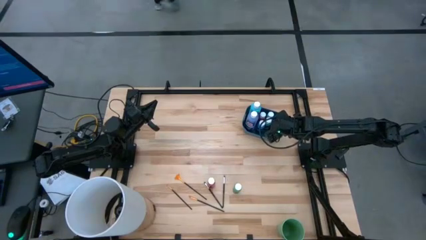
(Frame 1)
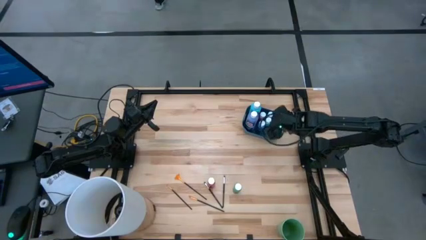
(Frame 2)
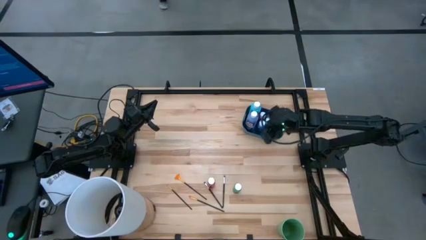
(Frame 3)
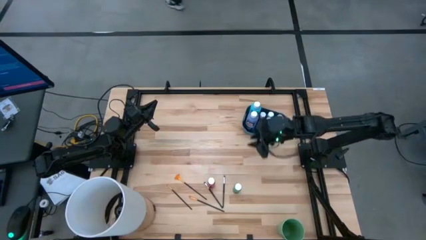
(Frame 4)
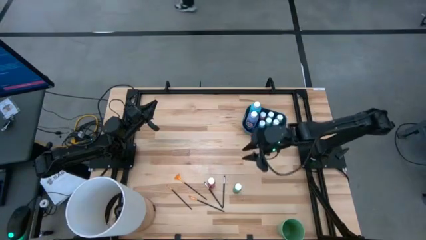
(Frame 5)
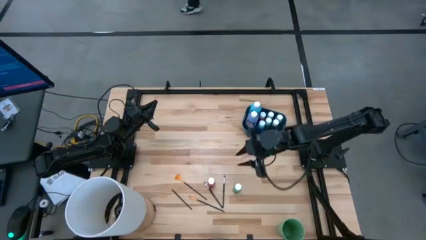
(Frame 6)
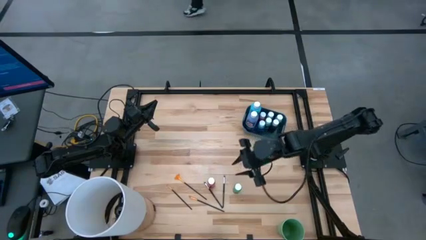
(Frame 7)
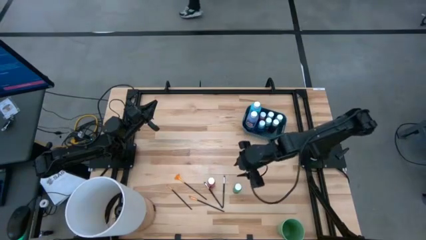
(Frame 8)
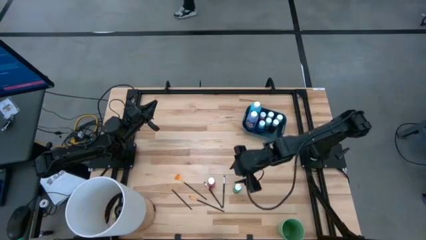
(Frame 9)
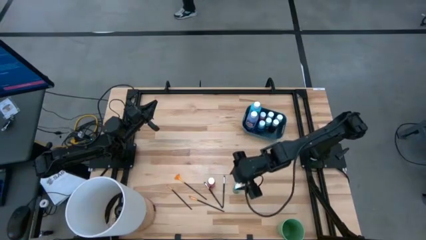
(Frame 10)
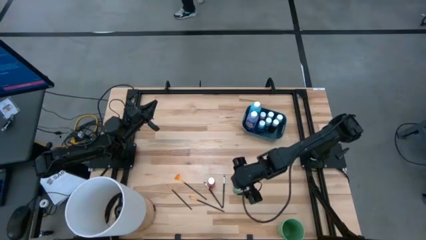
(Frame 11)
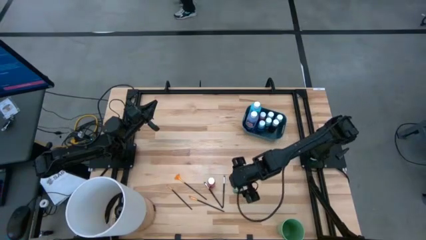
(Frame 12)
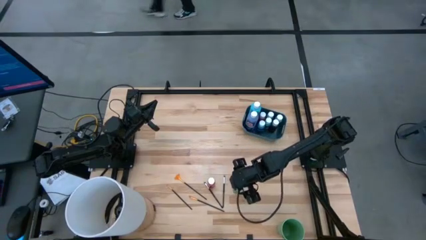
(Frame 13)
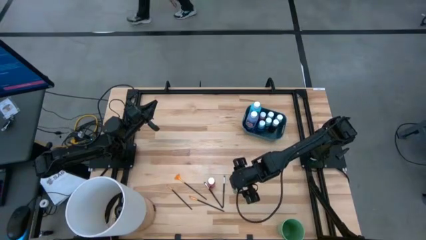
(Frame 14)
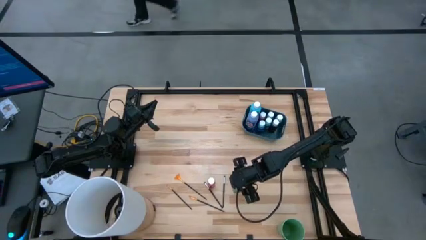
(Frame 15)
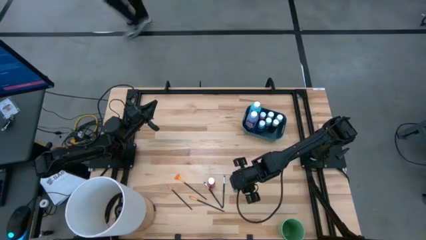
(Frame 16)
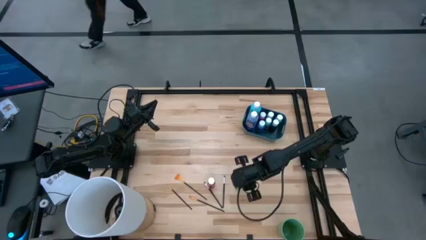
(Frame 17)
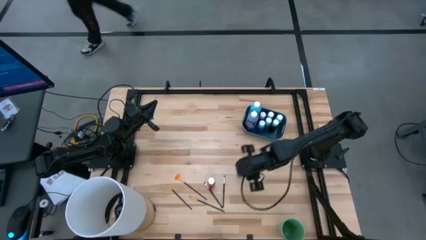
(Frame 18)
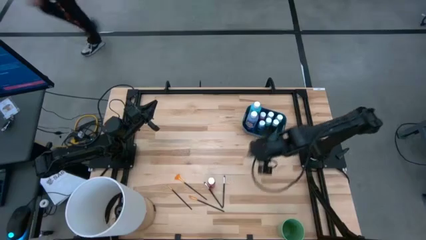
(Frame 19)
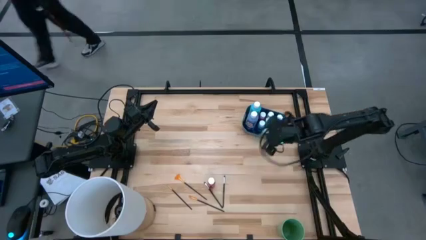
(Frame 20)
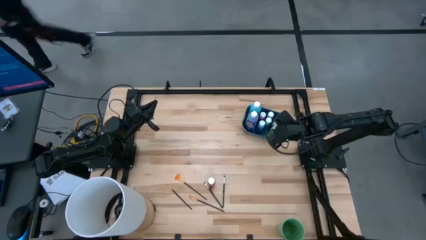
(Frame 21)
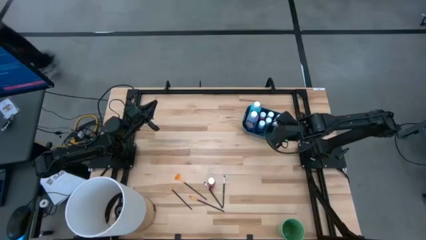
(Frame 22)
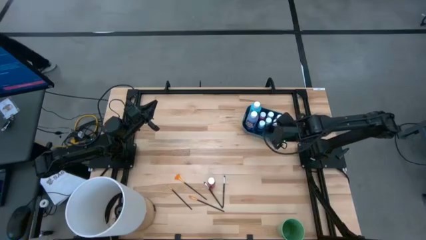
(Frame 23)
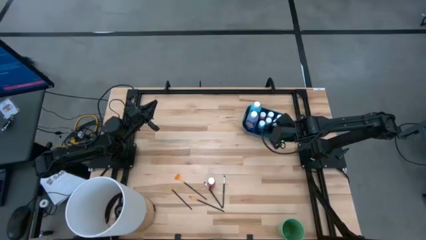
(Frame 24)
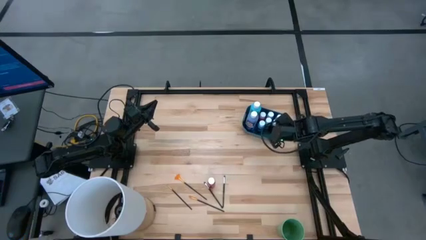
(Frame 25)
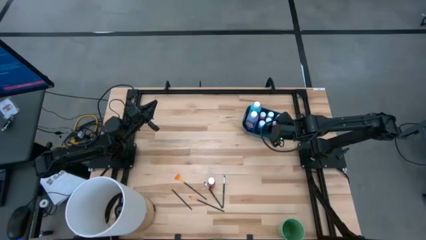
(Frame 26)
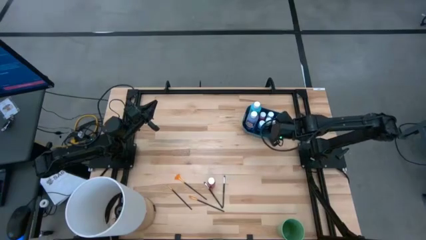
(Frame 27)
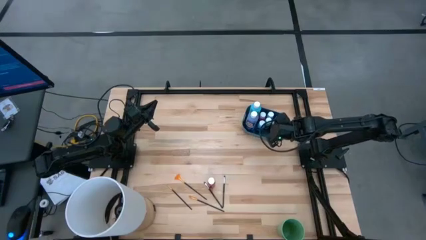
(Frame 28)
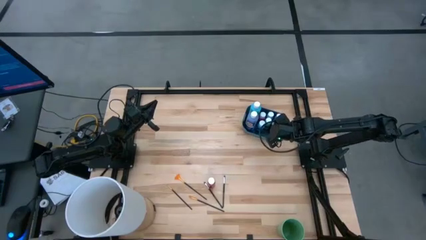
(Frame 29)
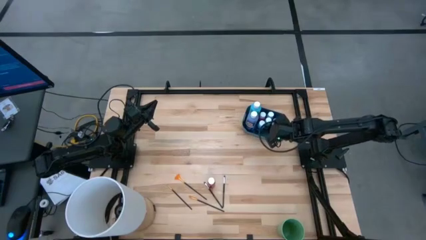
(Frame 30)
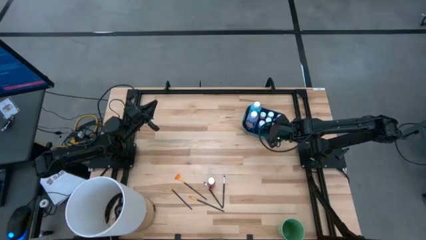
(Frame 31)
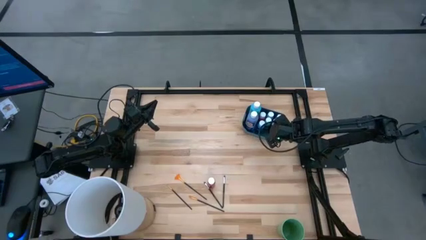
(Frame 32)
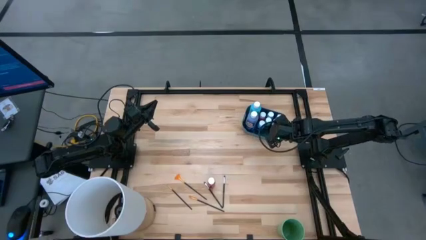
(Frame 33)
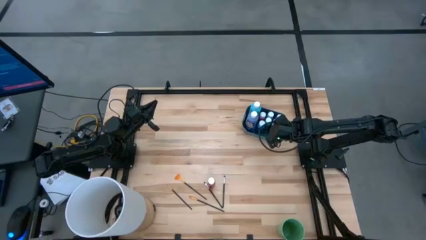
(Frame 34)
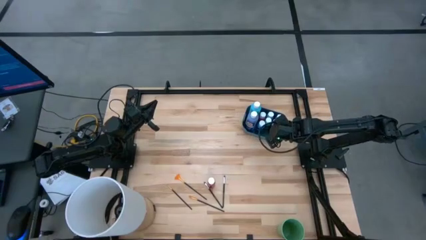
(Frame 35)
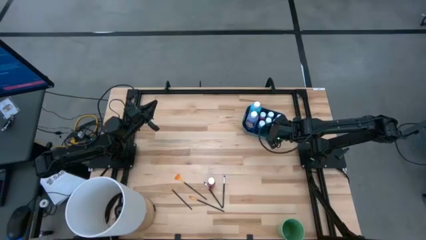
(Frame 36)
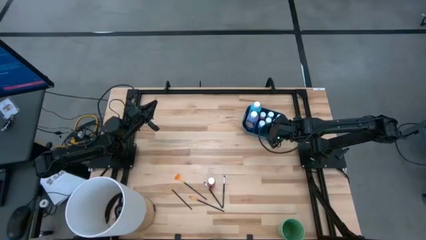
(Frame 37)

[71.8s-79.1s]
Task: Pick & Place Paint Supplies
Put the small green paint bottle into the blue bin

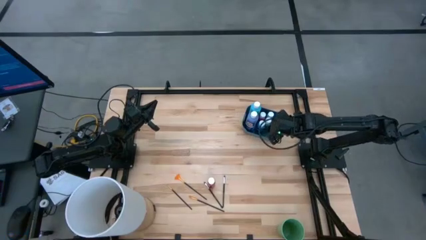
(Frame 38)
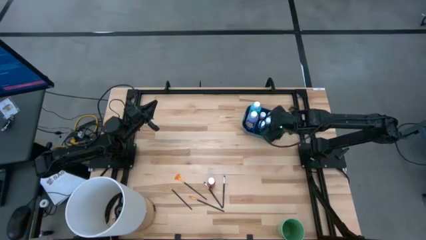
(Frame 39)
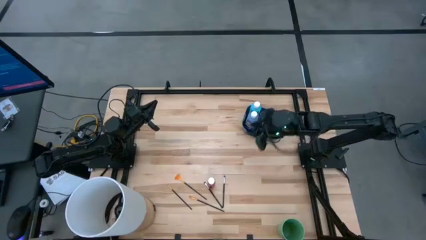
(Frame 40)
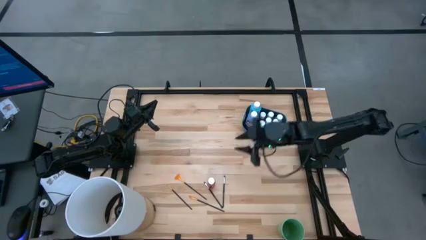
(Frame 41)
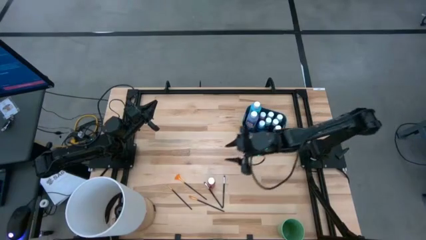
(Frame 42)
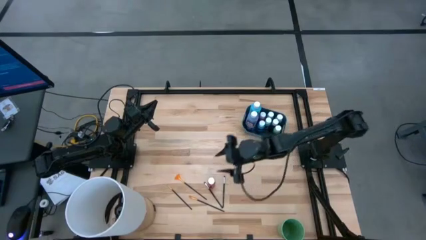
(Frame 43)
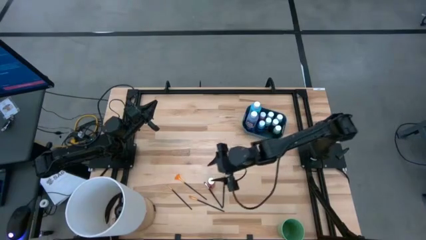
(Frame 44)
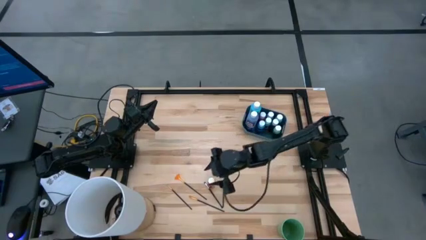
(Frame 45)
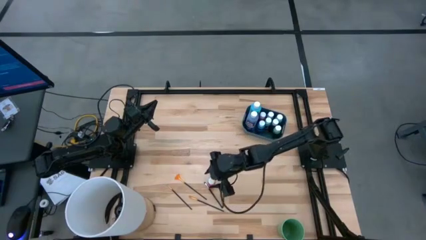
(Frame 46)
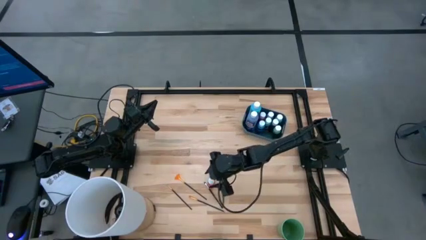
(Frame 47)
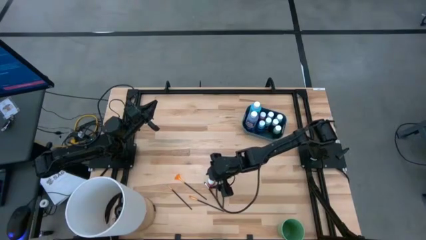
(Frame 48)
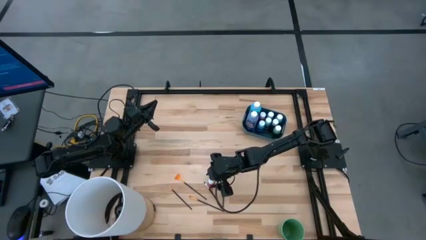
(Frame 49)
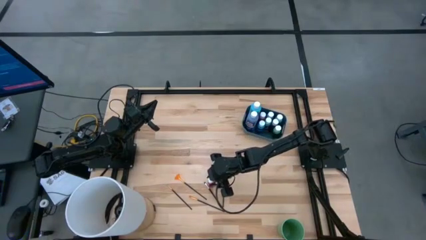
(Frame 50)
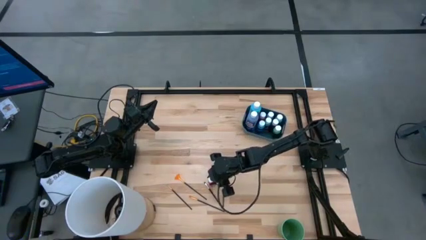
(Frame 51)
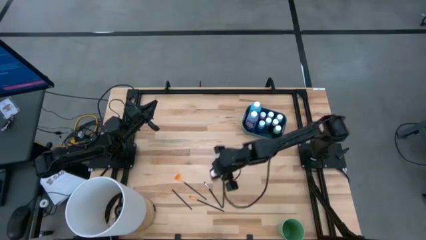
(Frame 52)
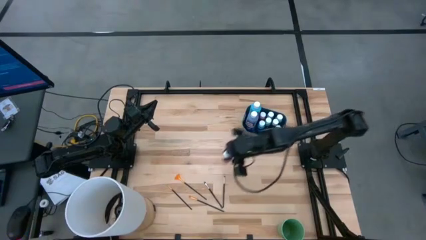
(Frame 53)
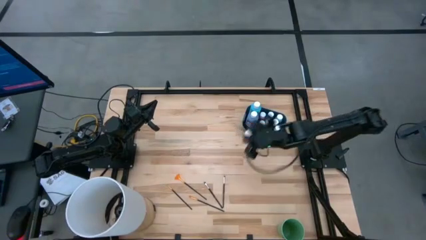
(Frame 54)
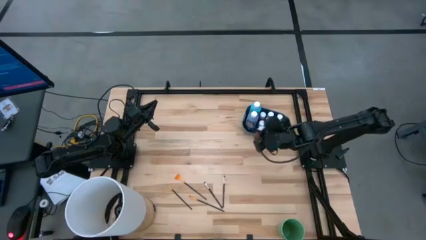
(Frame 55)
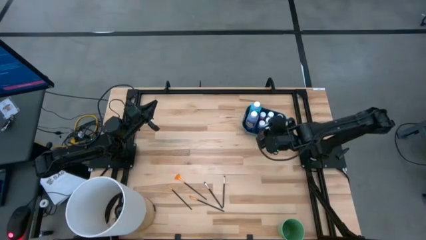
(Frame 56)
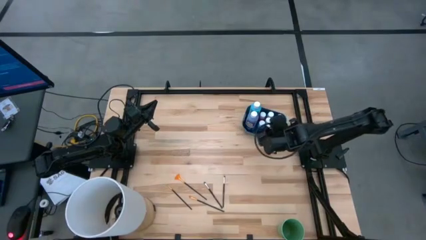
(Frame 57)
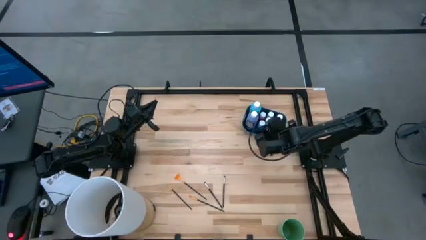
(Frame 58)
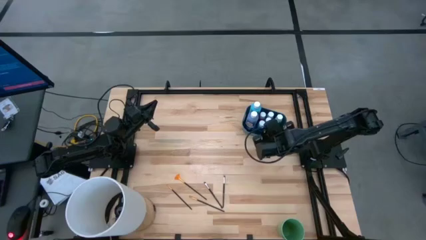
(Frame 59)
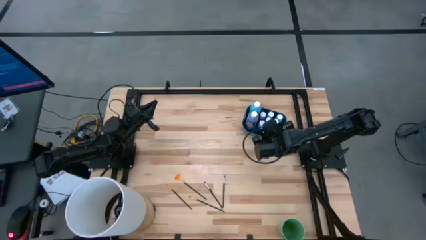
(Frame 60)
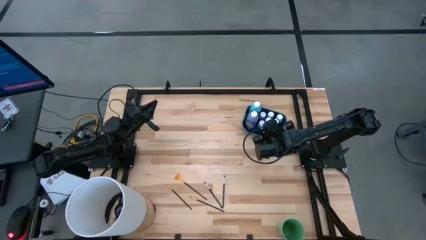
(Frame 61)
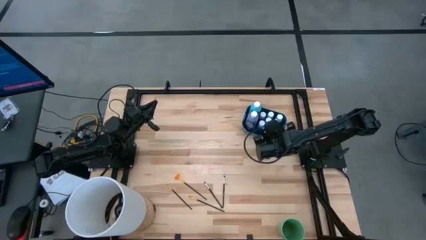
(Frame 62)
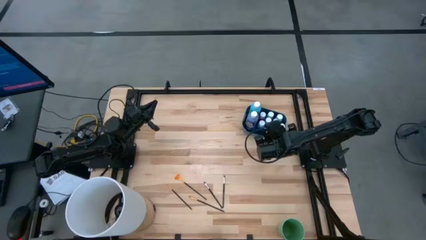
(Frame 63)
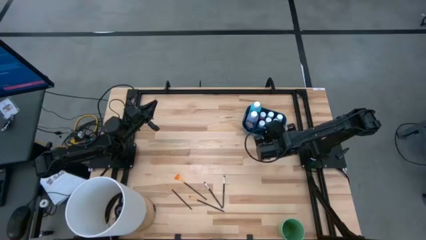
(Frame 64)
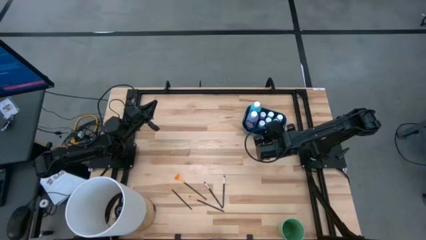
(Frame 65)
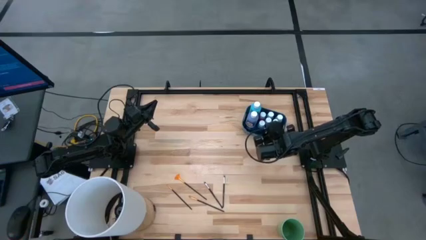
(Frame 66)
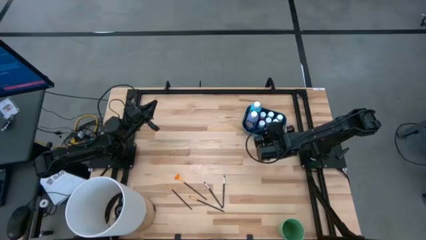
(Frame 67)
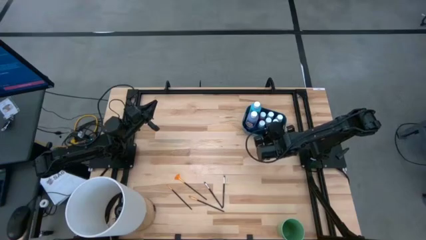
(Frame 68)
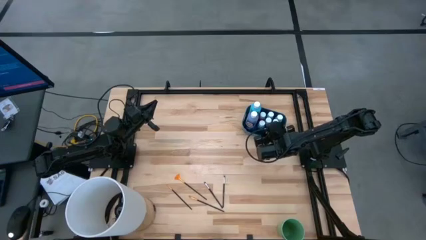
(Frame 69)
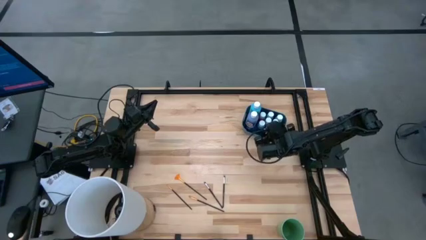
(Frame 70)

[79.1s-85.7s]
Put the small red paint bottle into the blue bin

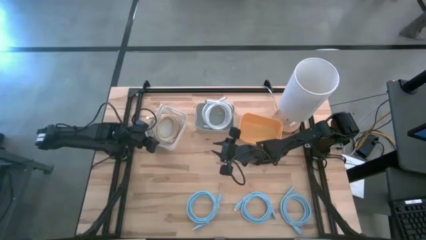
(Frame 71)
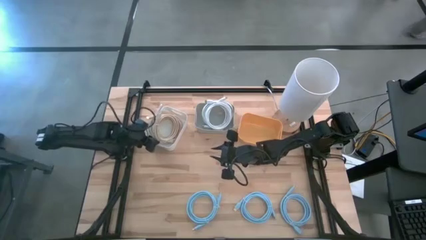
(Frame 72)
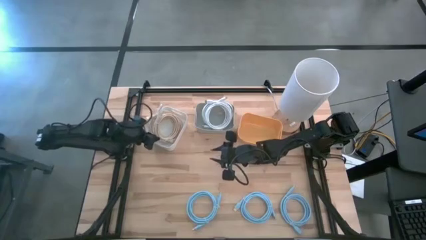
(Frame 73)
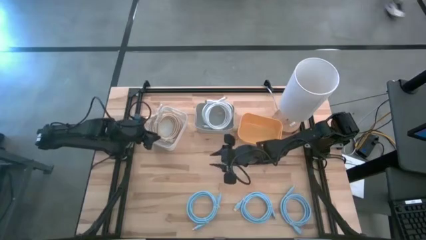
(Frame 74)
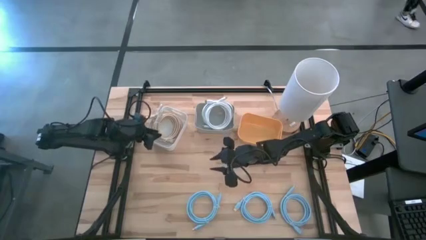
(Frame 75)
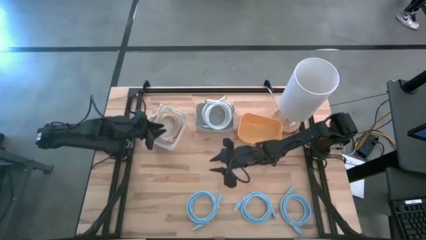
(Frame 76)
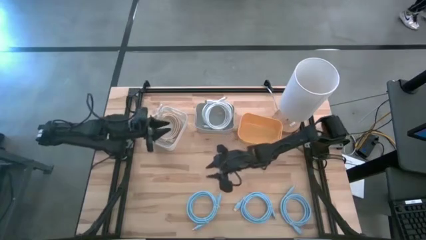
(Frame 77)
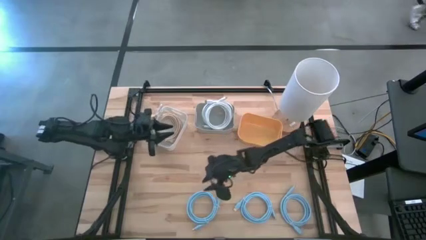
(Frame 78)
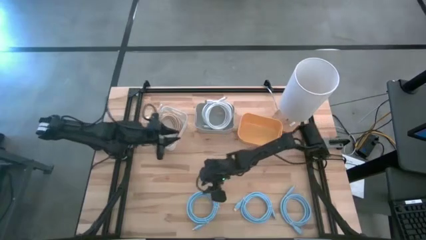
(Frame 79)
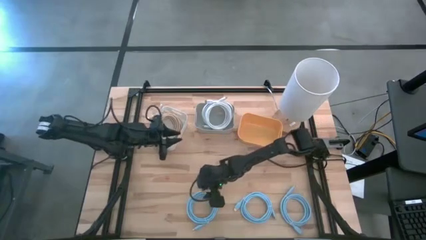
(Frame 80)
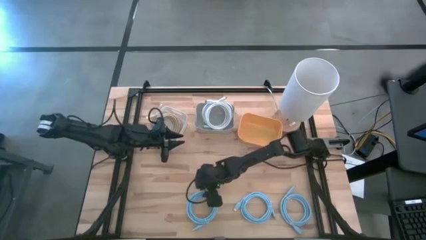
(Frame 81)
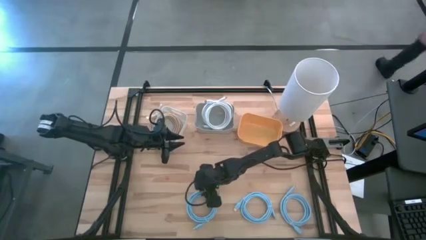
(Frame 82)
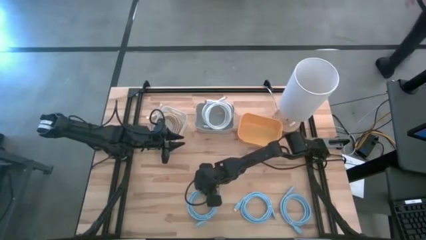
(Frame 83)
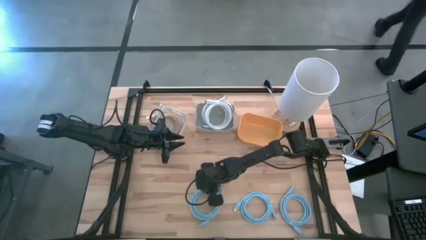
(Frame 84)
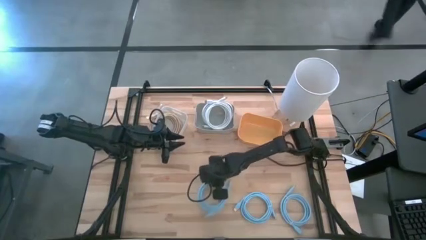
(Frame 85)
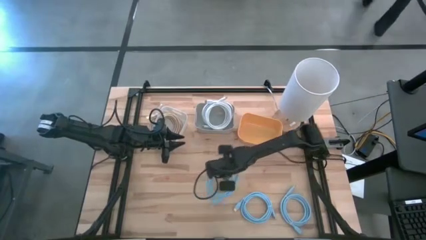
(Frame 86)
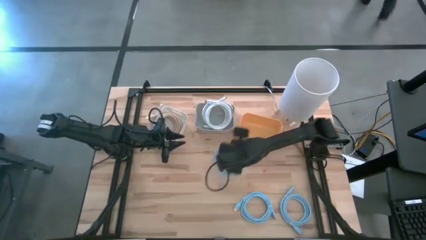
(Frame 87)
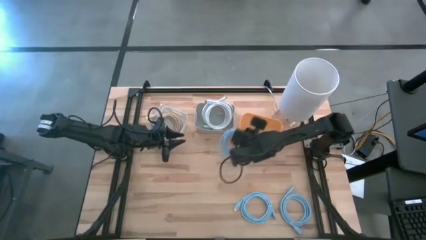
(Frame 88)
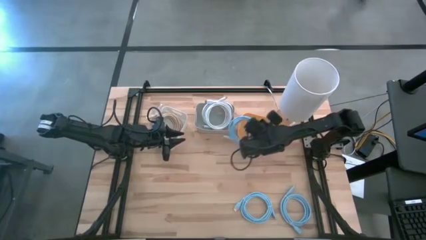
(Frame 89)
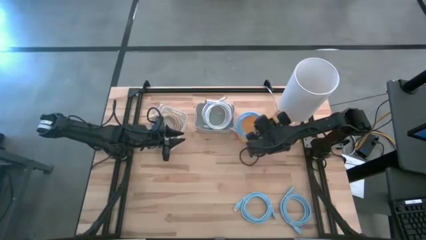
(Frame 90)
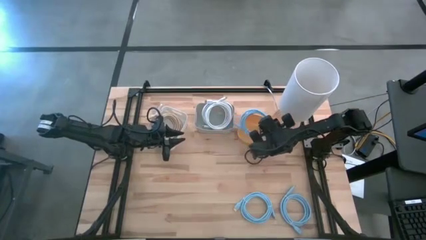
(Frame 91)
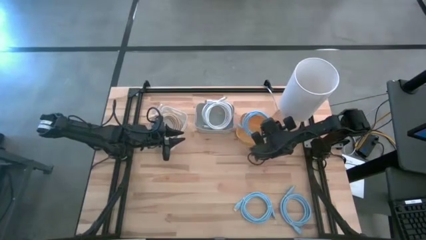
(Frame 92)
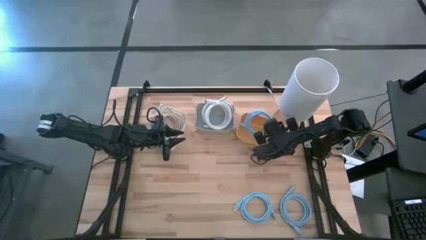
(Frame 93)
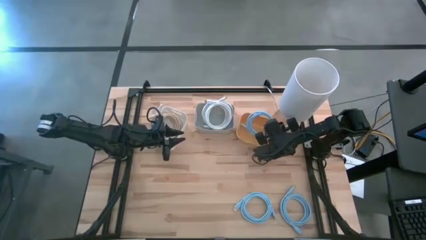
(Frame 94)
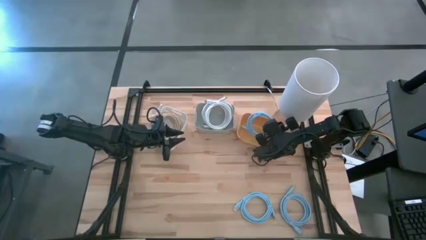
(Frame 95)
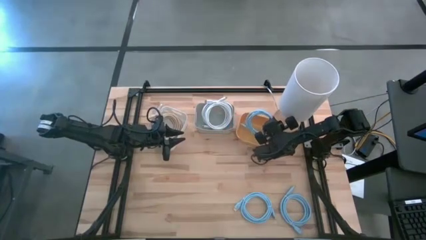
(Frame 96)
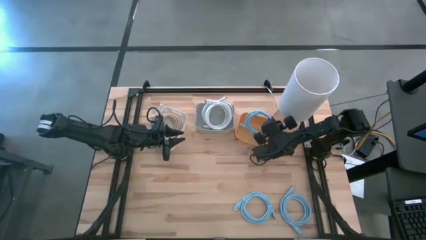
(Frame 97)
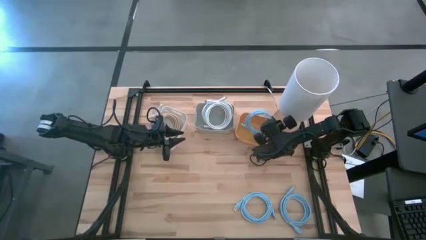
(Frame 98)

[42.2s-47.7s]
Task: Sort HDMI cables
Put the left blue HDMI cable into the orange bin
